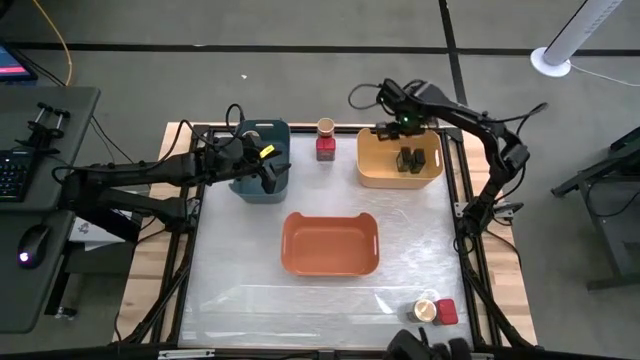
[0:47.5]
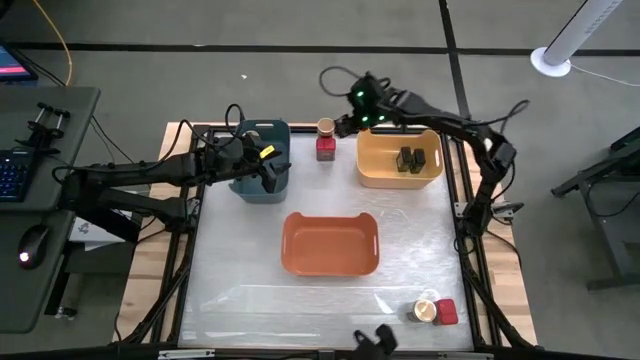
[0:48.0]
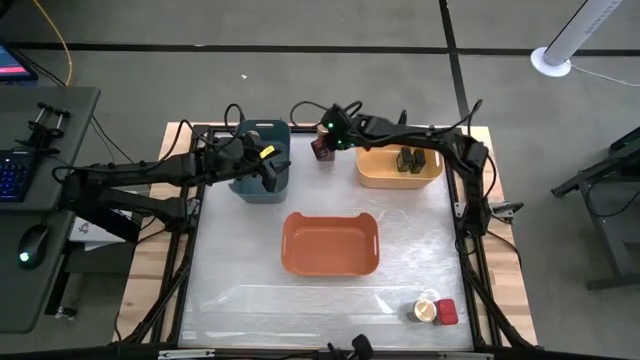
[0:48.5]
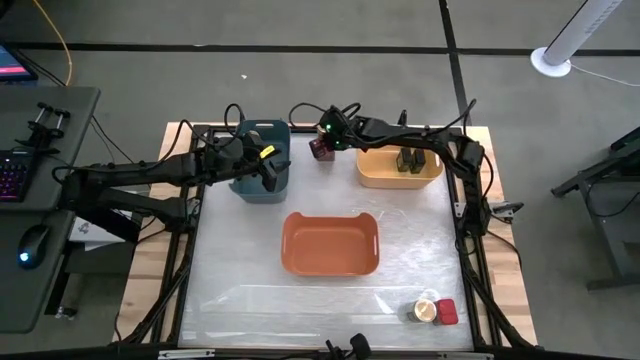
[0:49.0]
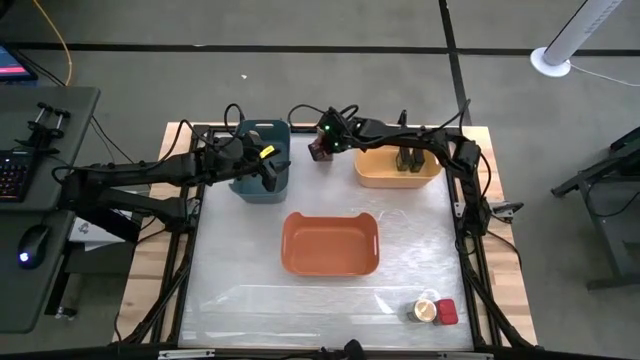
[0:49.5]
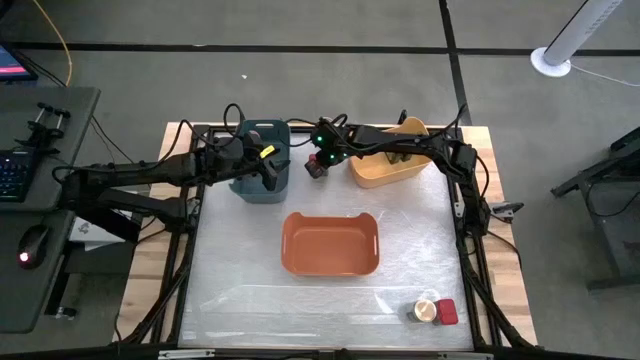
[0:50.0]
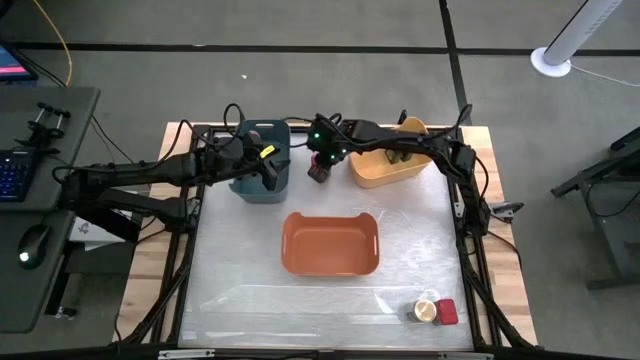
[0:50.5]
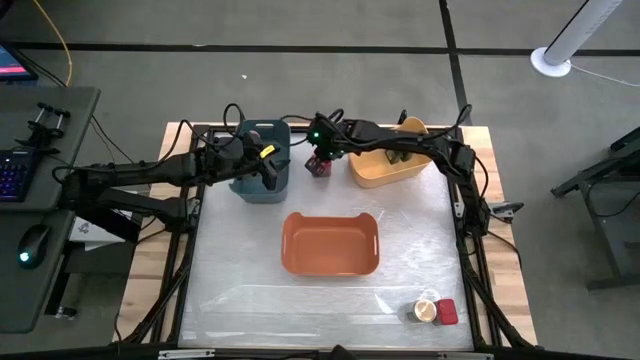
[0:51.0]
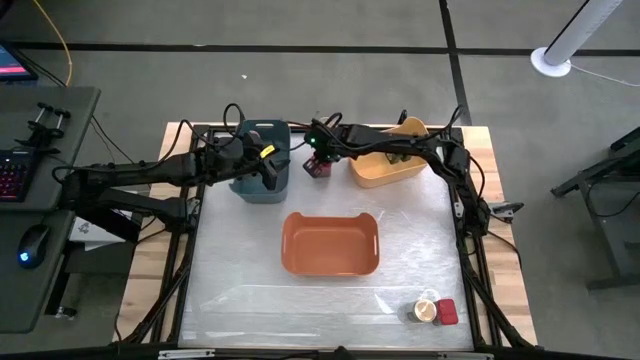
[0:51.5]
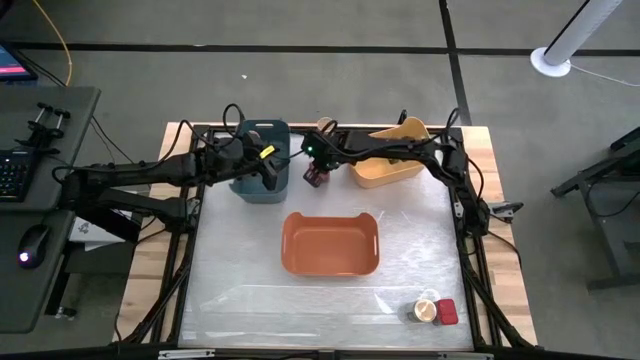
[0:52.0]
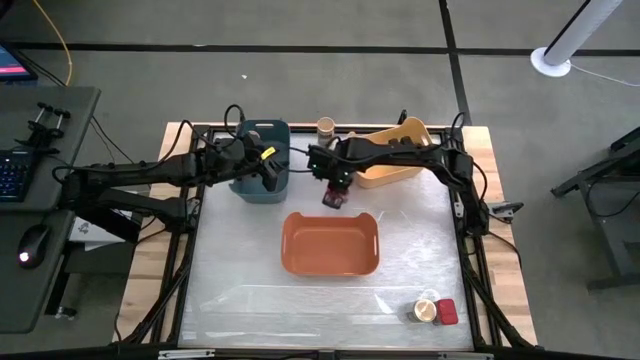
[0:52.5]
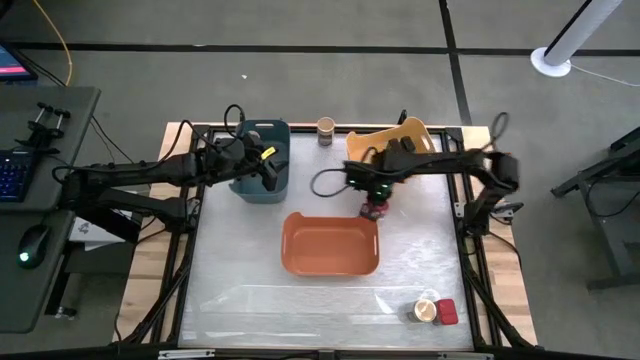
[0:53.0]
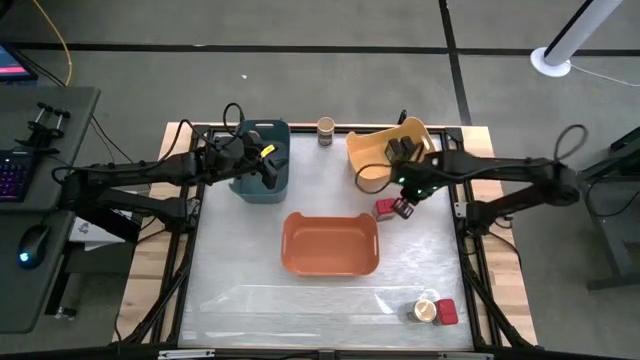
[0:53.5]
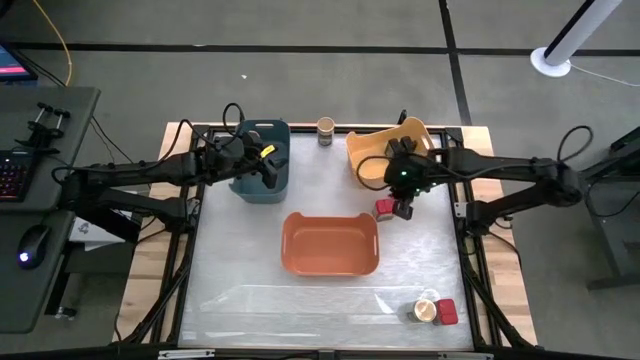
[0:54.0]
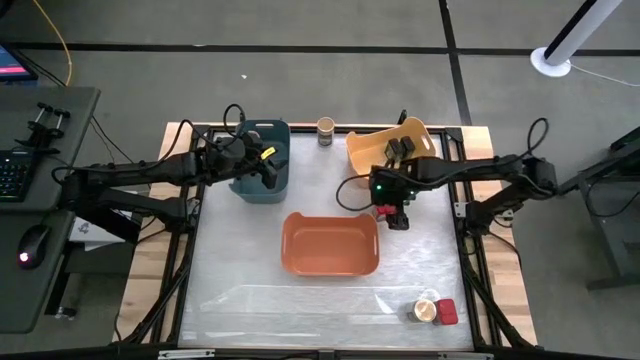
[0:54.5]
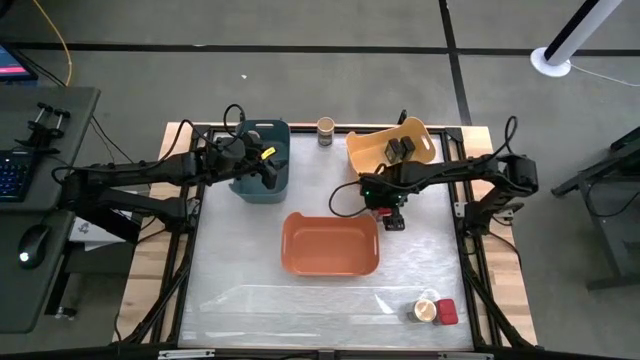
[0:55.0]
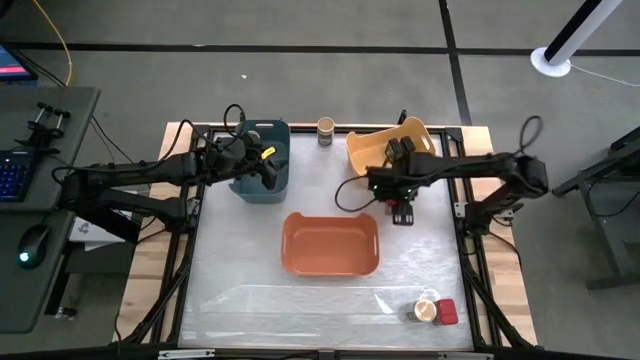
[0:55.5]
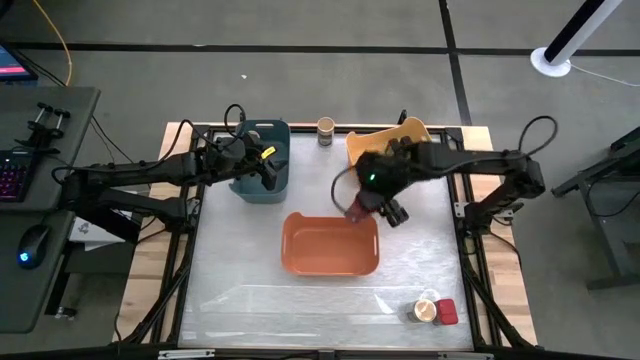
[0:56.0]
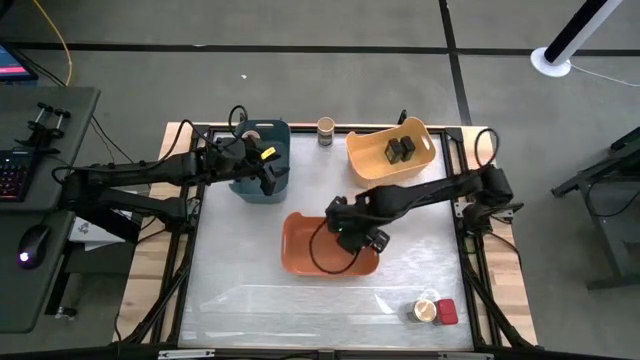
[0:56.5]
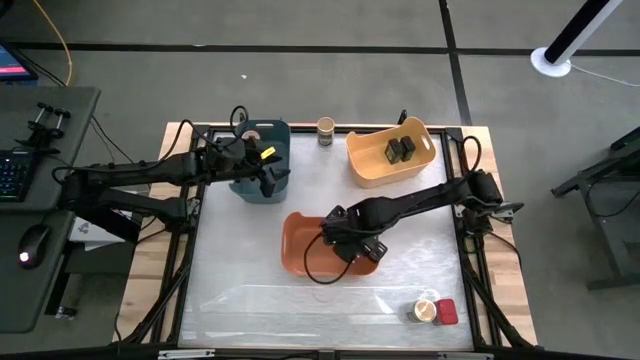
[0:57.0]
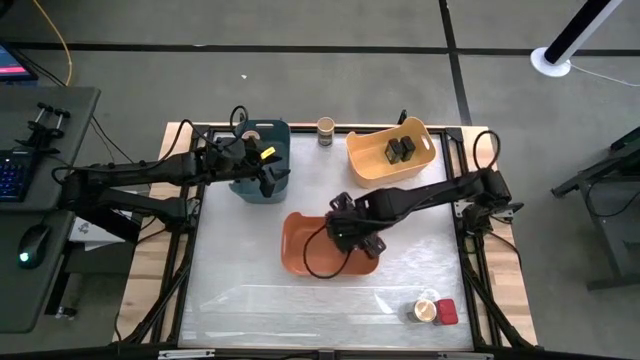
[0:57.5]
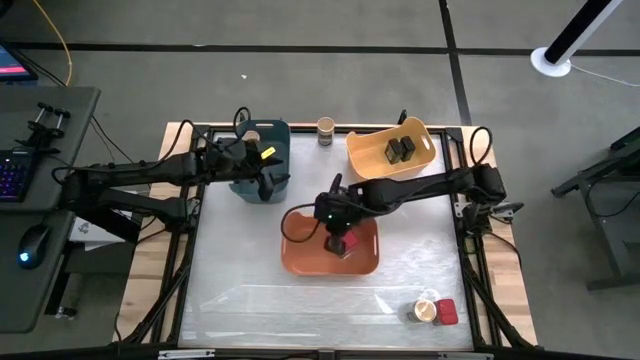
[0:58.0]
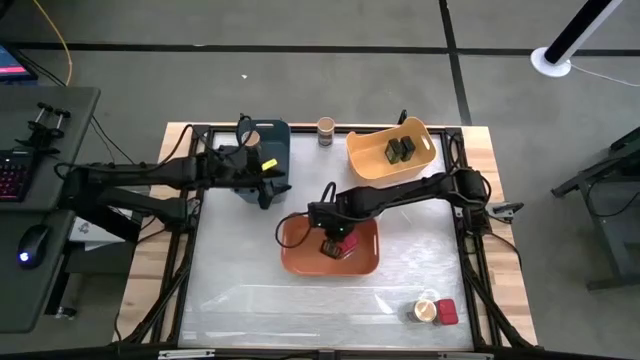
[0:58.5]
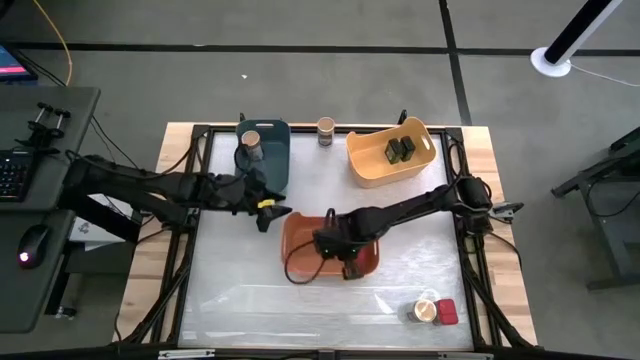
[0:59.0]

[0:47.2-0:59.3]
Task: Sort spices by type
Put the top red seasoning can into the orange bin

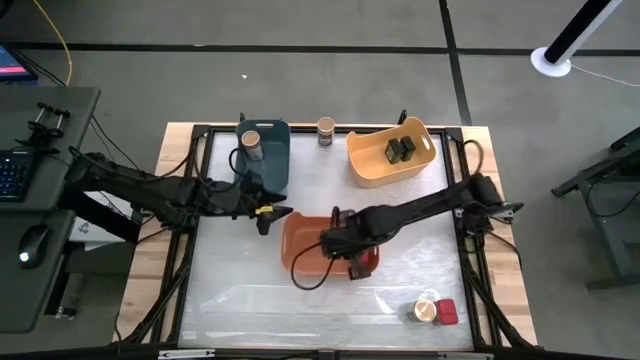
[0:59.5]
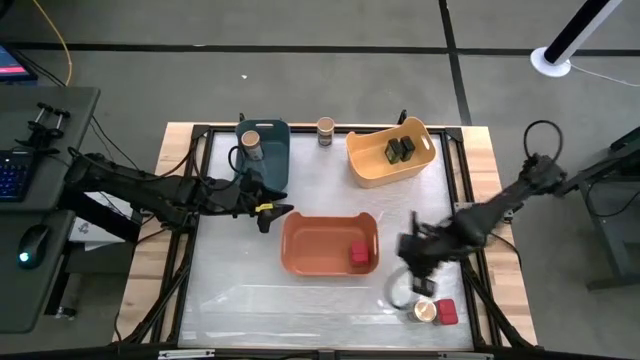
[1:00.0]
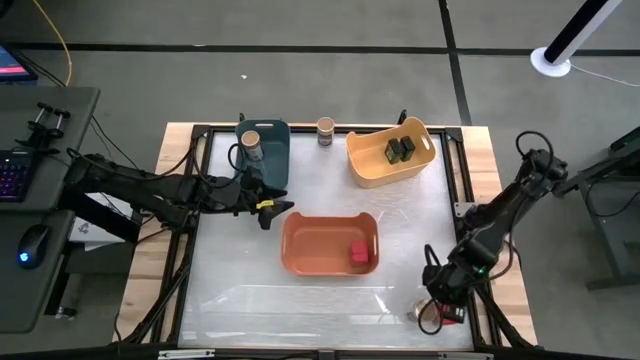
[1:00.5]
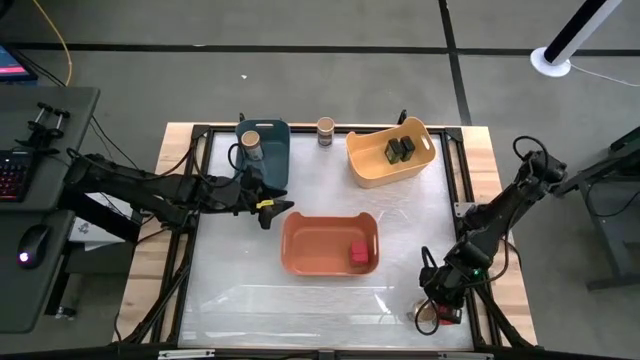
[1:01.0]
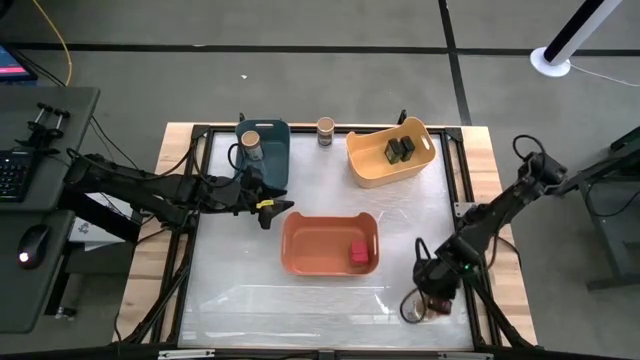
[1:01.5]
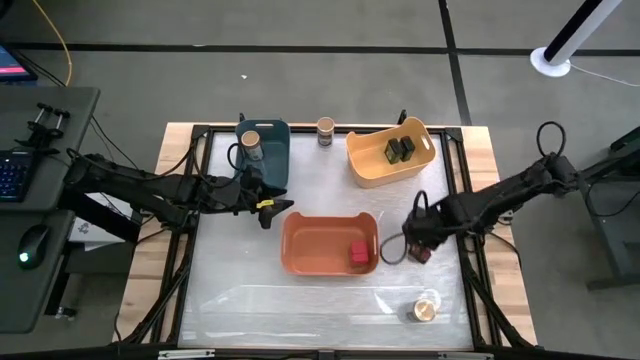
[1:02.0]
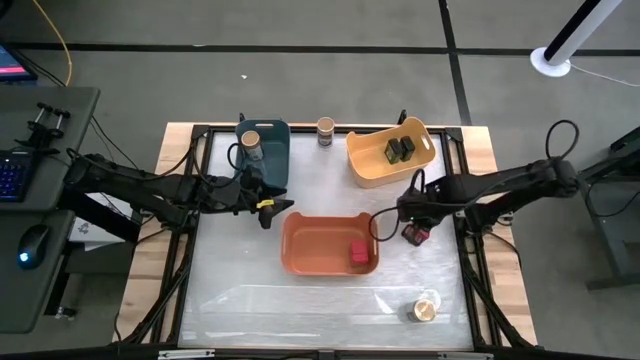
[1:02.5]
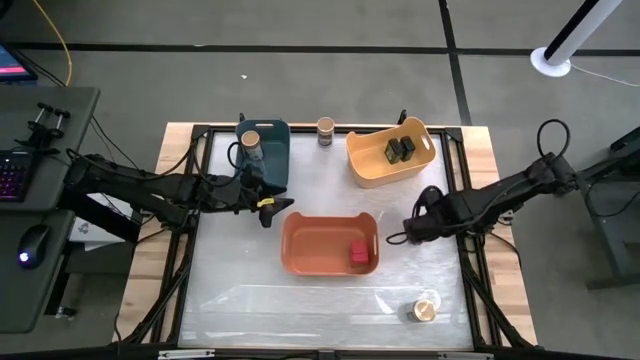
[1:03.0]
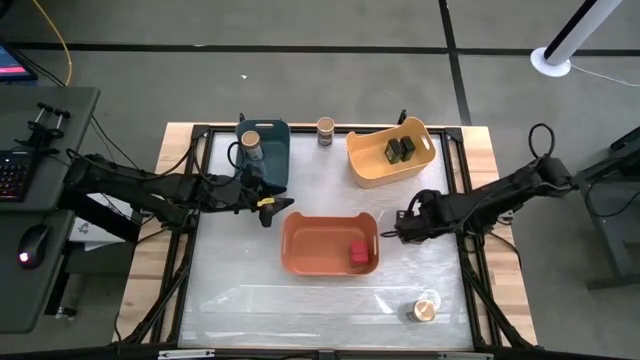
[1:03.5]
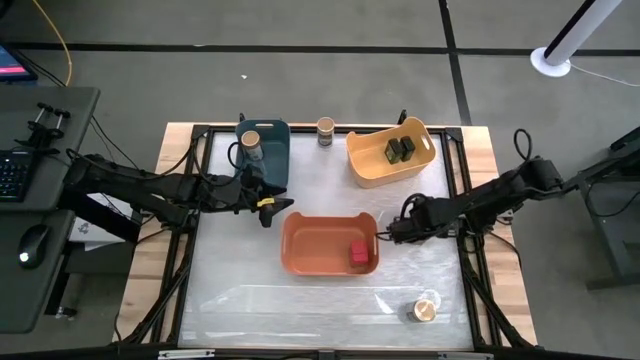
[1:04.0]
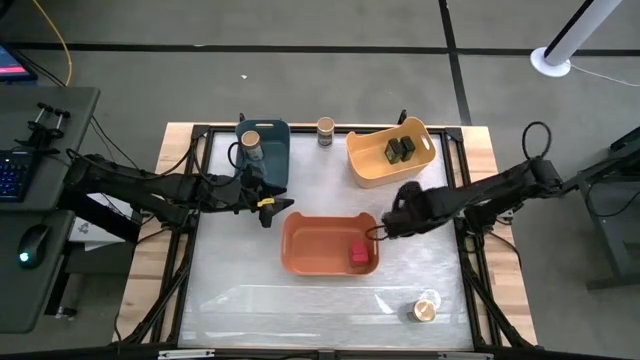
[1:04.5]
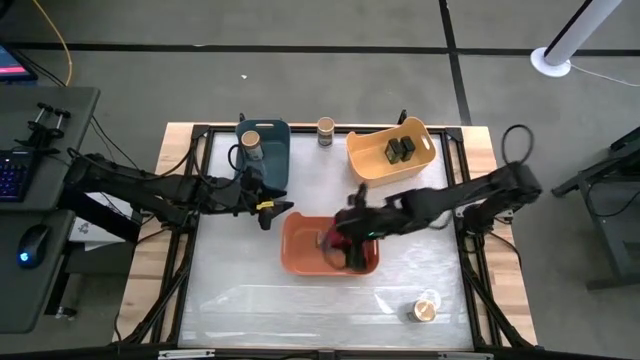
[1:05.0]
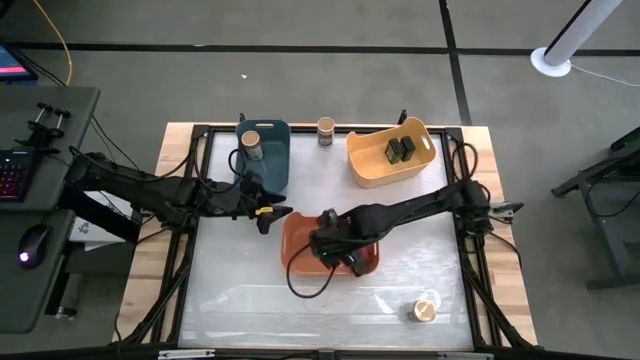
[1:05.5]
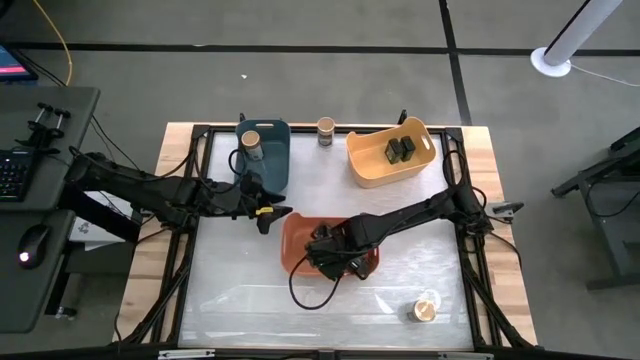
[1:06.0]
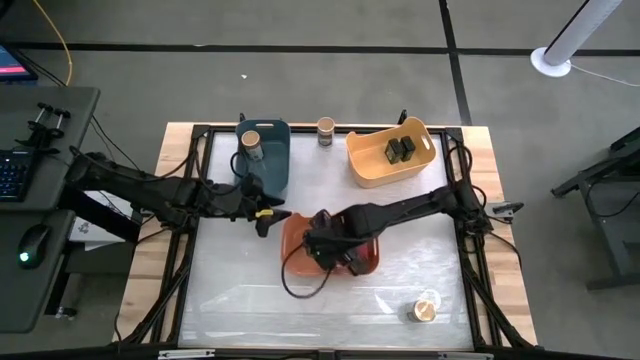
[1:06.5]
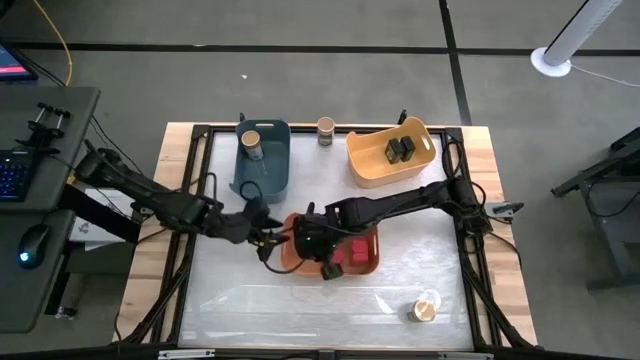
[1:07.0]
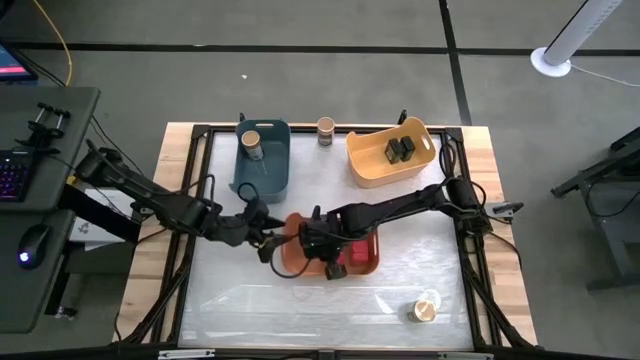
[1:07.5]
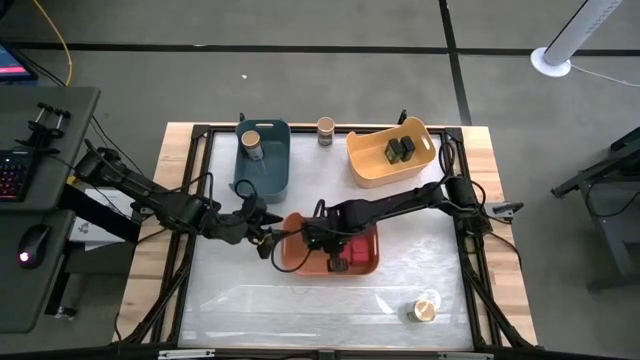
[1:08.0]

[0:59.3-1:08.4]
Put the red seasoning can into the orange bin

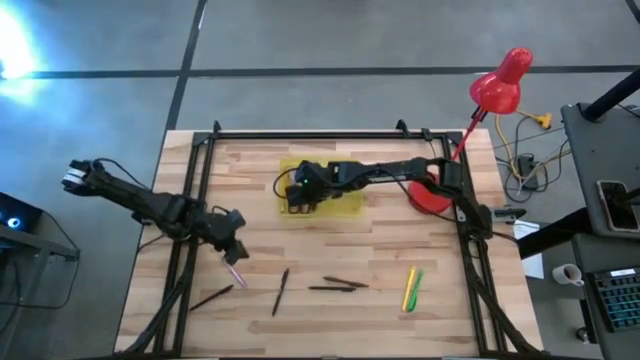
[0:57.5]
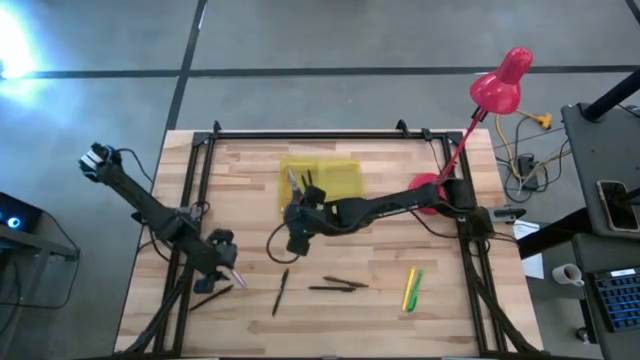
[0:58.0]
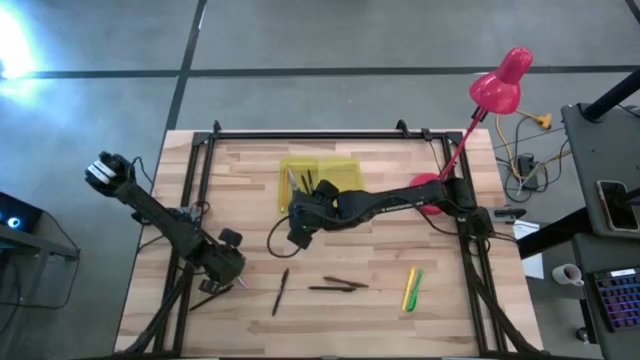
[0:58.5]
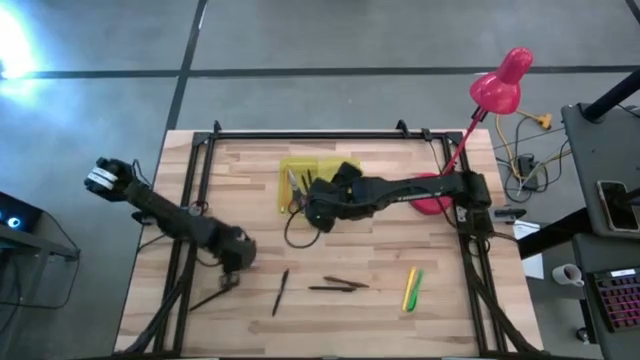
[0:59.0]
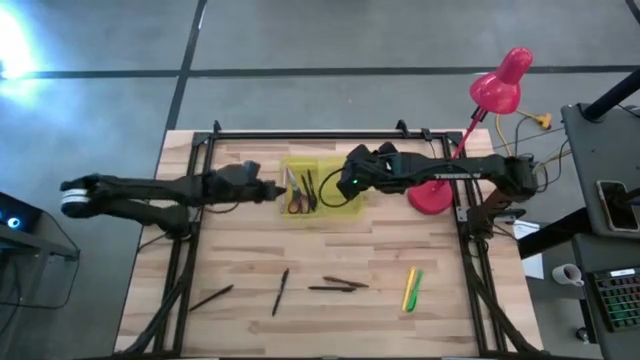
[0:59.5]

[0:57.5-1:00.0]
Task: Pick & place school supplies into a supply box
Put the purple pen into the supply box
